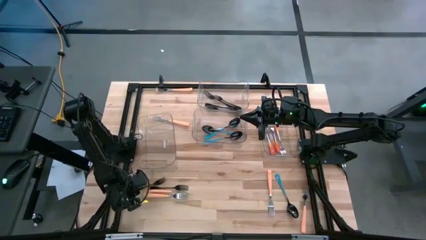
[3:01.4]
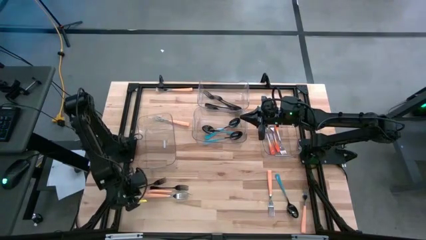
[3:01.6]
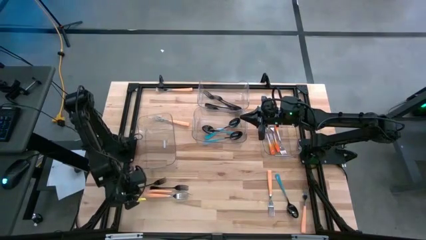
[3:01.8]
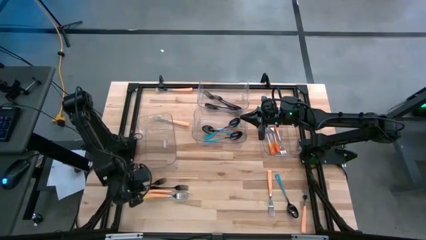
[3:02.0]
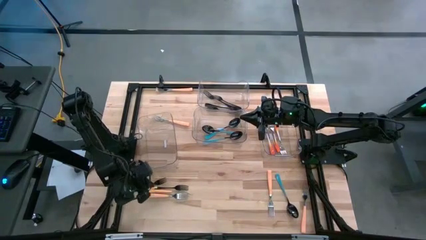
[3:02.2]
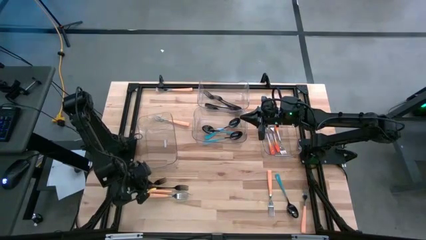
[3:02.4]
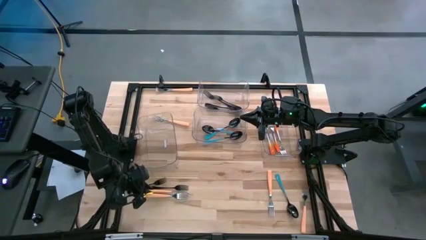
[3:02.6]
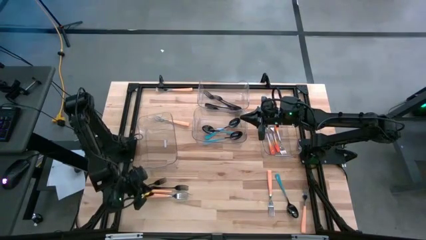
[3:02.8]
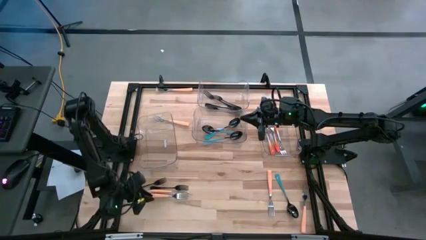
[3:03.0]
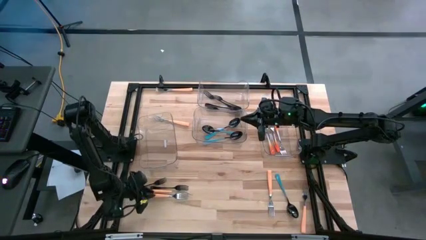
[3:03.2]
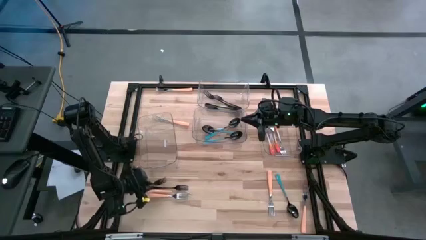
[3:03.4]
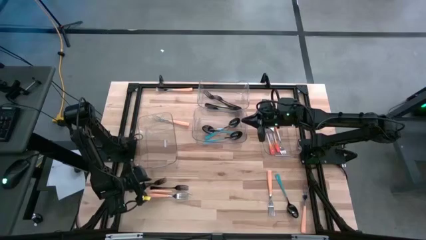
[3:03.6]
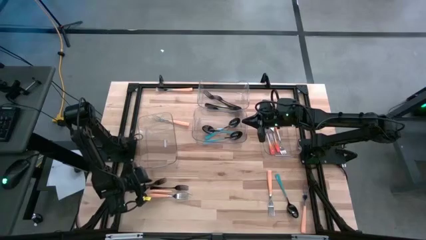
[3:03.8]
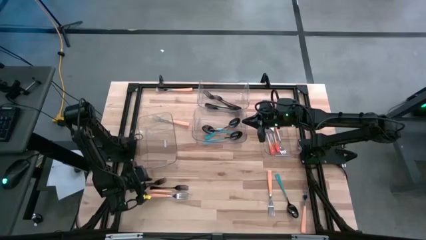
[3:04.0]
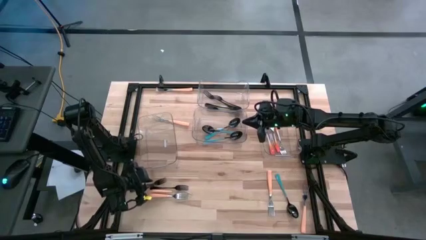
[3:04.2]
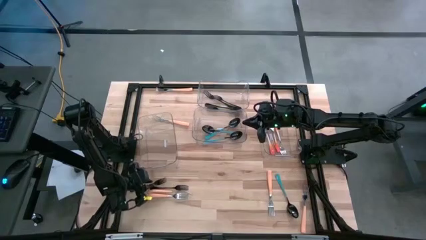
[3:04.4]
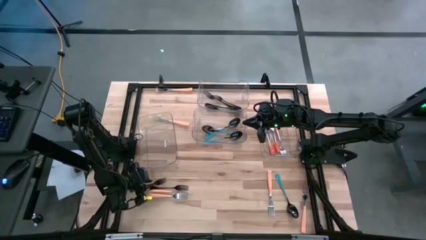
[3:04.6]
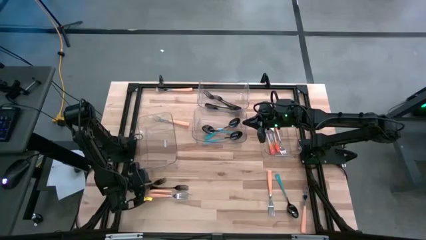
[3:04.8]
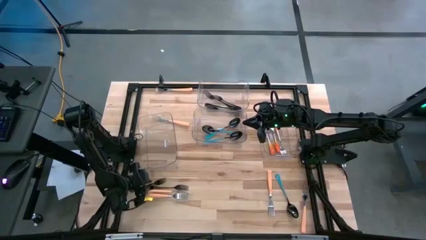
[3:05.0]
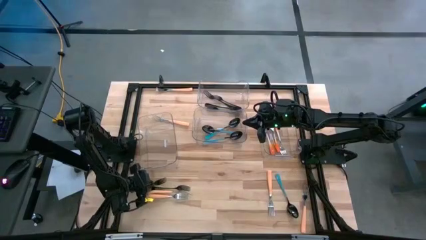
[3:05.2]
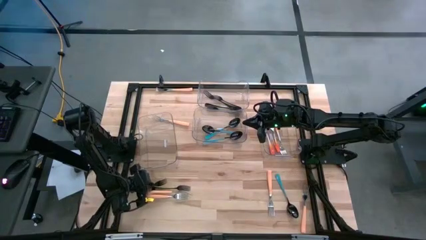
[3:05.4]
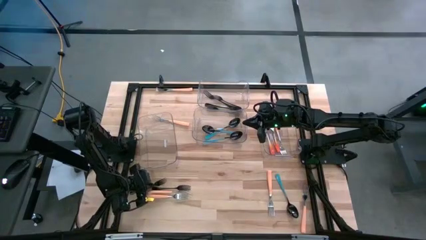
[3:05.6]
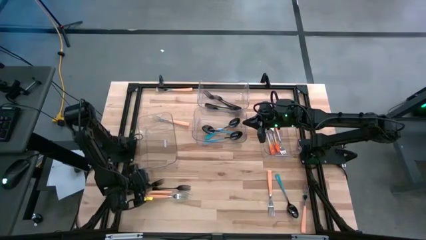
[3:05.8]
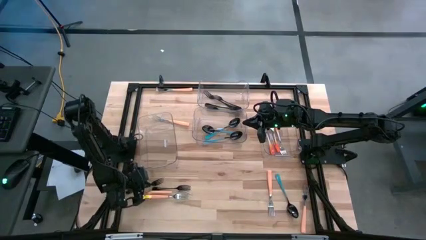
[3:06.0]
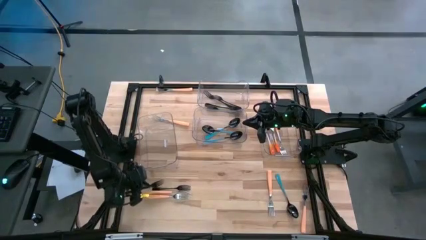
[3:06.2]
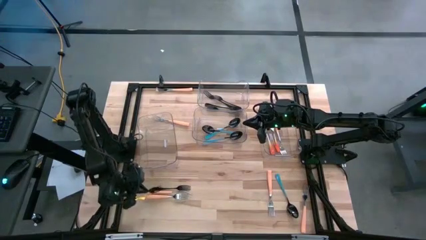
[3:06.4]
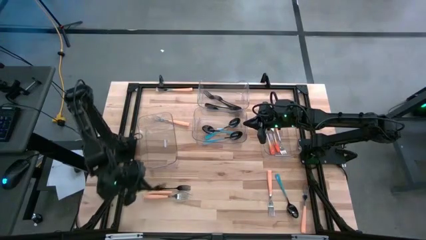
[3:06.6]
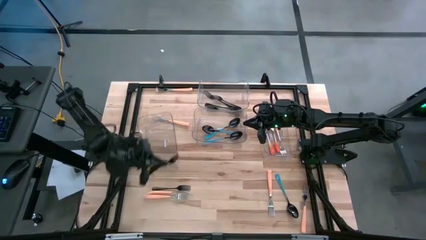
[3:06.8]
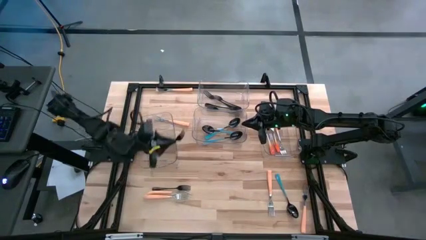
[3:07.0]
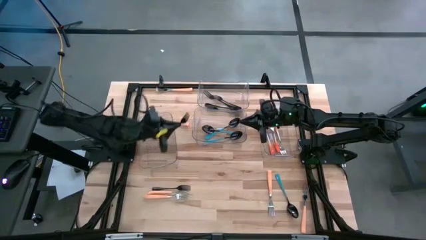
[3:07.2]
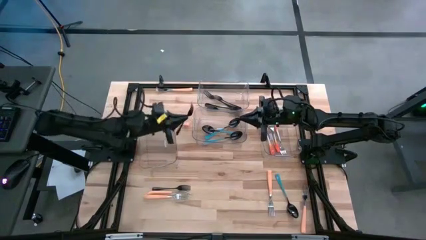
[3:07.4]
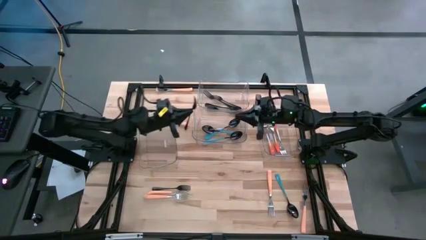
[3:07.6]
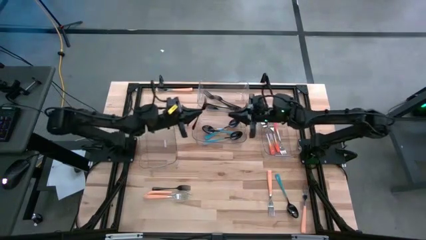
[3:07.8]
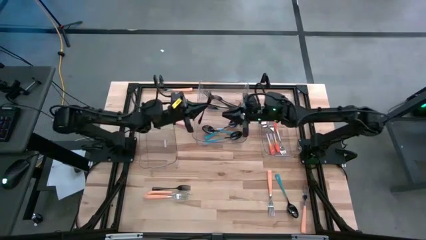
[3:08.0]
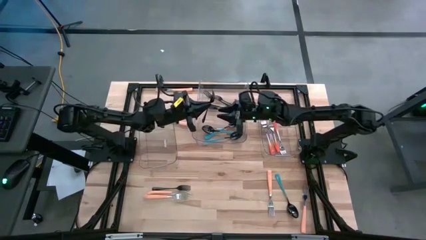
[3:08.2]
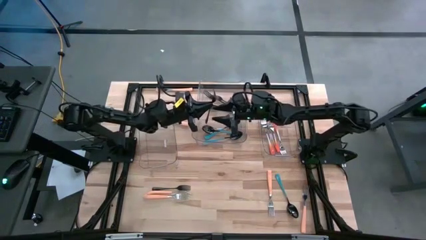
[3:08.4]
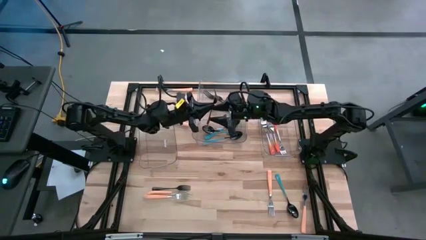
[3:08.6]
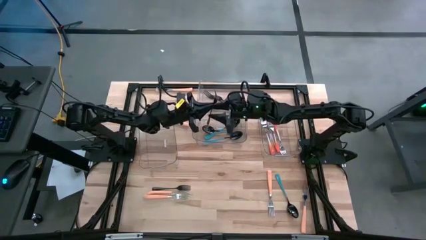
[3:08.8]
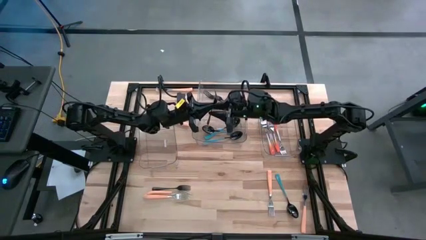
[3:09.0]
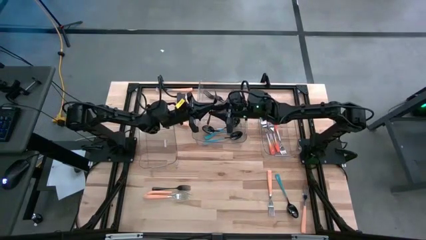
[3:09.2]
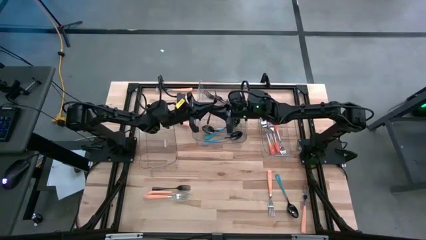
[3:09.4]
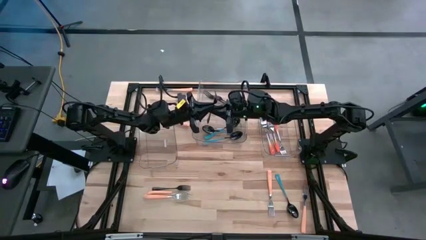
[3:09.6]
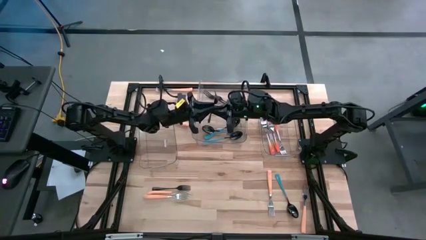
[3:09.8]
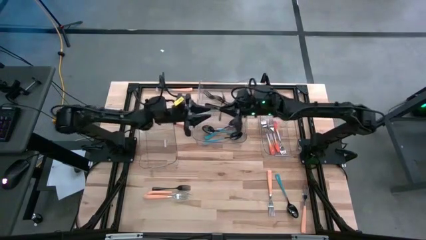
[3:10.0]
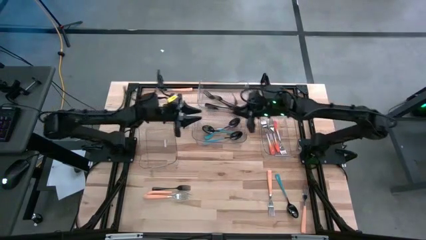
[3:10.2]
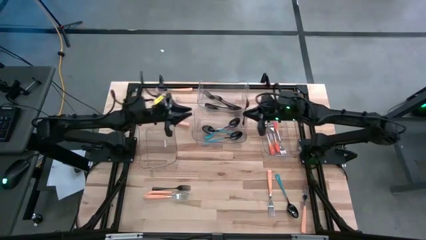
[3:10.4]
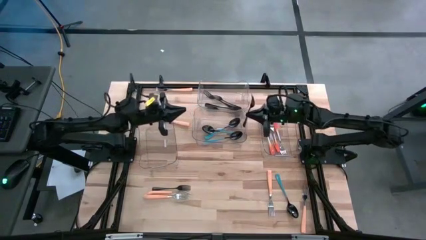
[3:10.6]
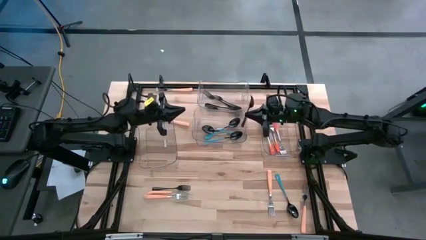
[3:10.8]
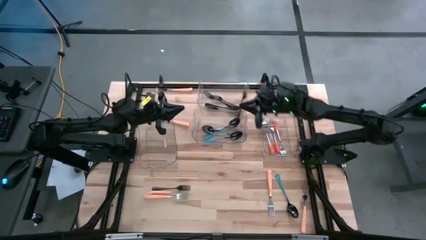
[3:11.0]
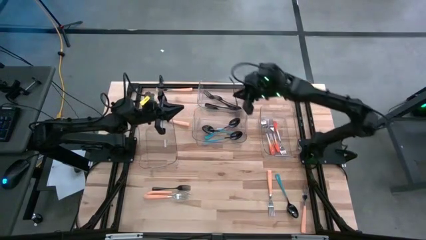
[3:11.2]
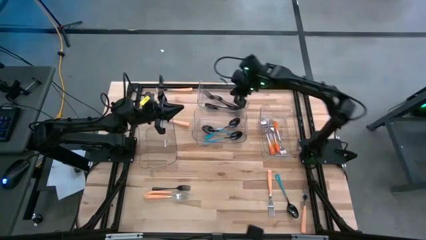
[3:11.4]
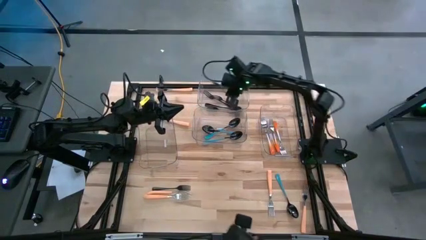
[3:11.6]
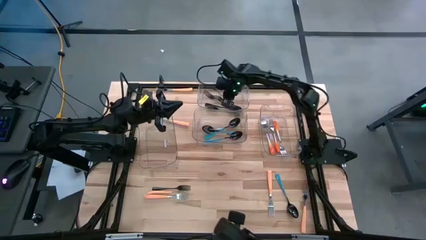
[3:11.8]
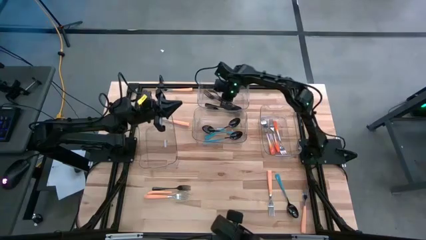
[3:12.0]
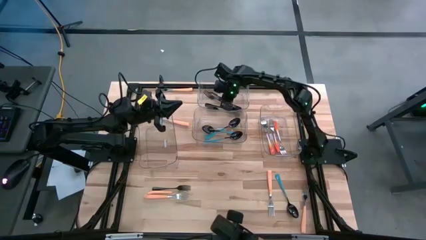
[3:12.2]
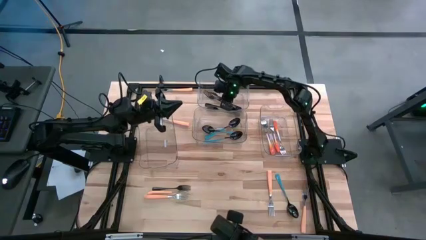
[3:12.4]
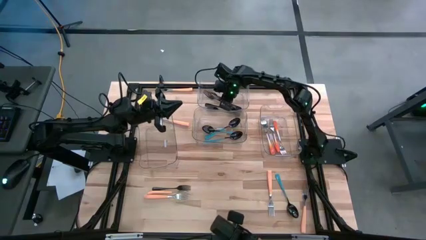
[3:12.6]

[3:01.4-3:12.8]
Task: Sort silverware by color (type)
Put the black fork into the top transparent bin
